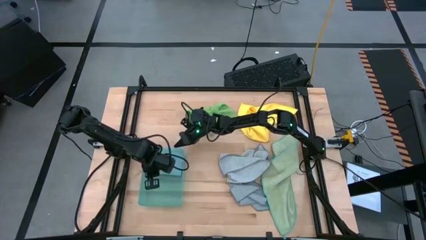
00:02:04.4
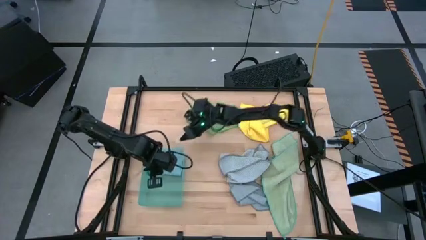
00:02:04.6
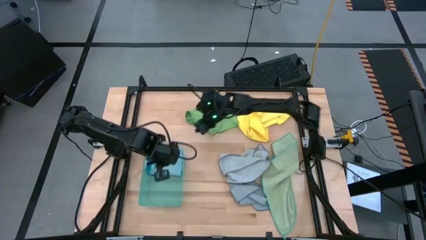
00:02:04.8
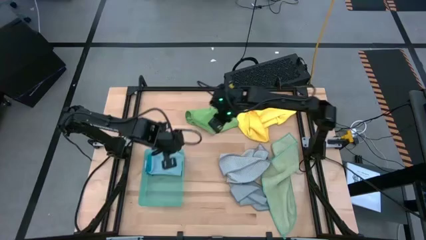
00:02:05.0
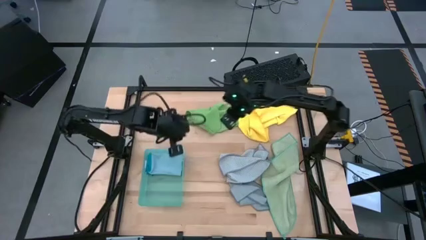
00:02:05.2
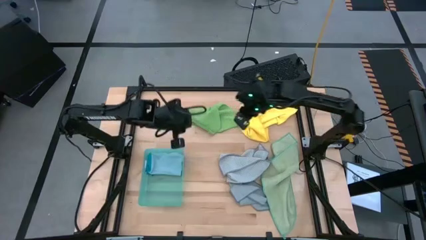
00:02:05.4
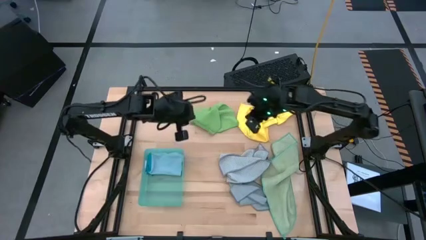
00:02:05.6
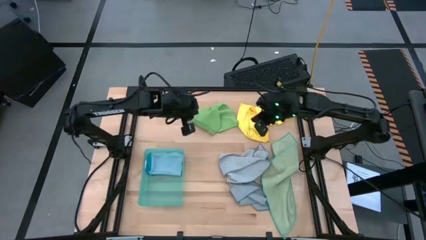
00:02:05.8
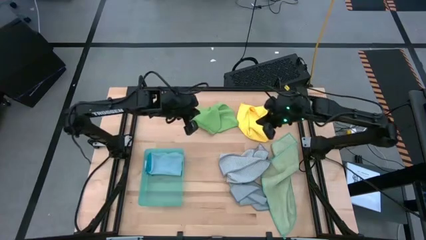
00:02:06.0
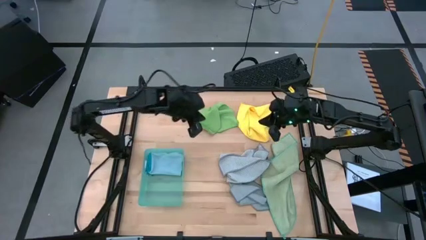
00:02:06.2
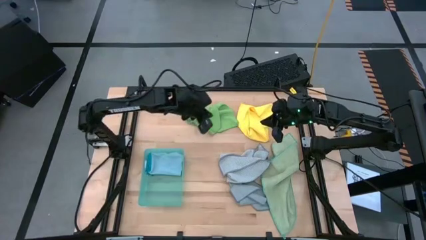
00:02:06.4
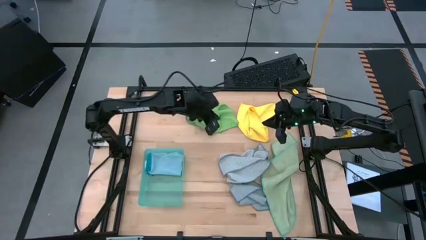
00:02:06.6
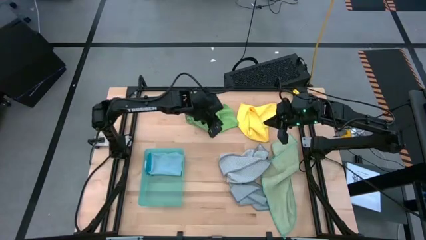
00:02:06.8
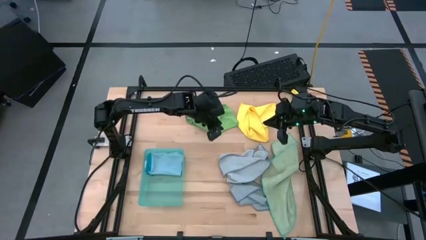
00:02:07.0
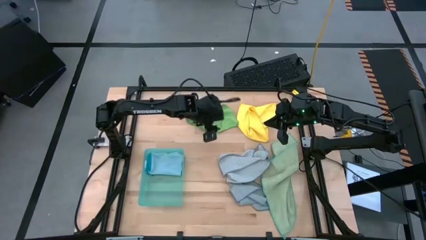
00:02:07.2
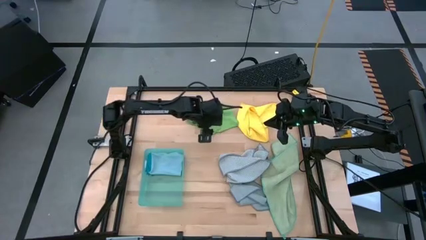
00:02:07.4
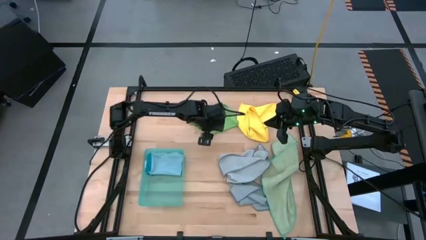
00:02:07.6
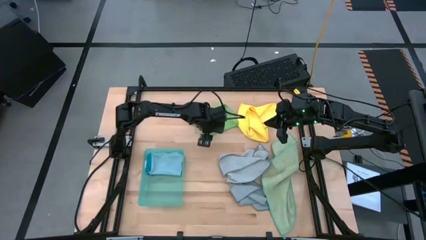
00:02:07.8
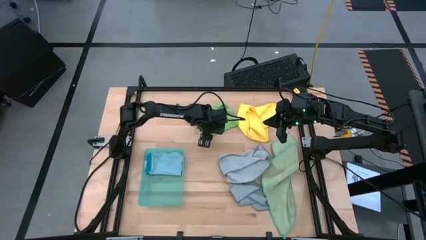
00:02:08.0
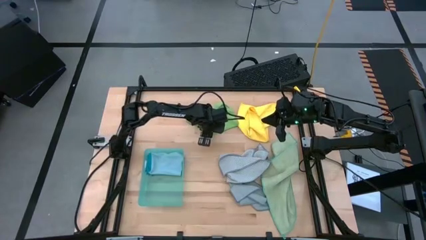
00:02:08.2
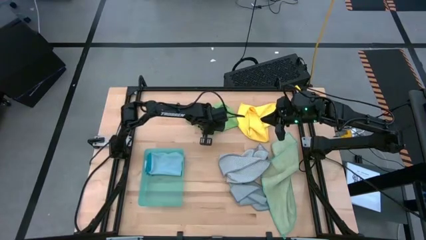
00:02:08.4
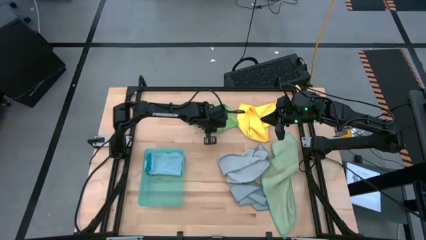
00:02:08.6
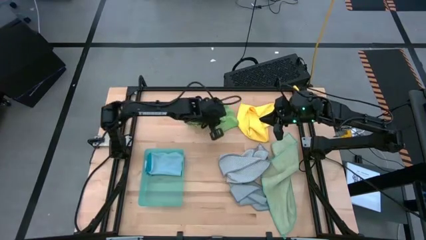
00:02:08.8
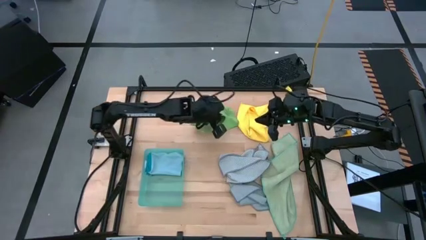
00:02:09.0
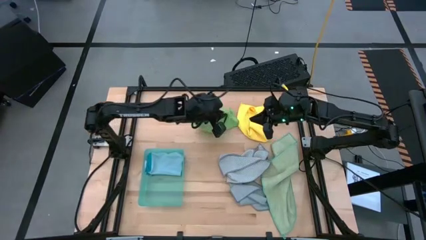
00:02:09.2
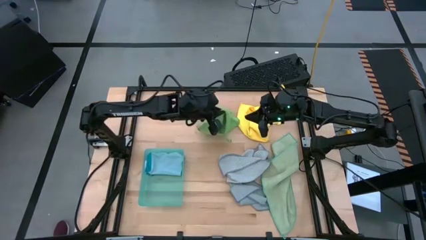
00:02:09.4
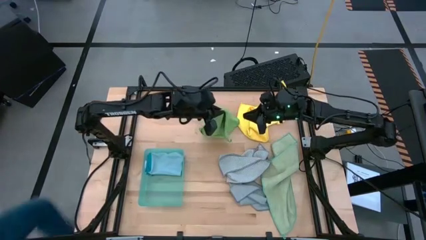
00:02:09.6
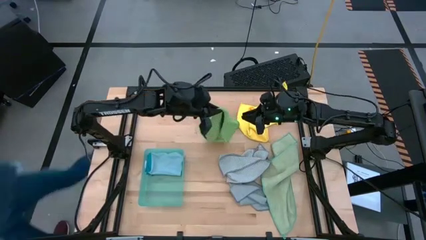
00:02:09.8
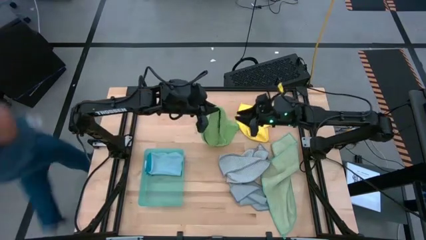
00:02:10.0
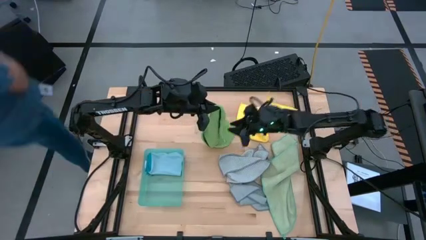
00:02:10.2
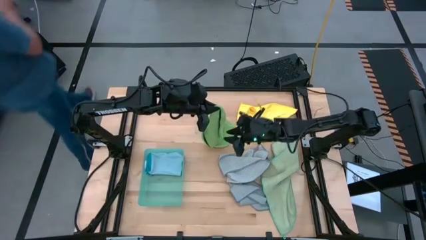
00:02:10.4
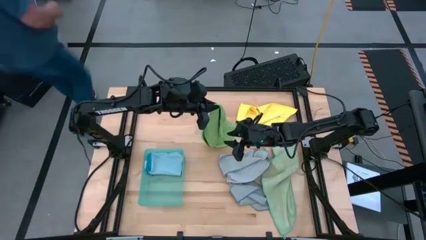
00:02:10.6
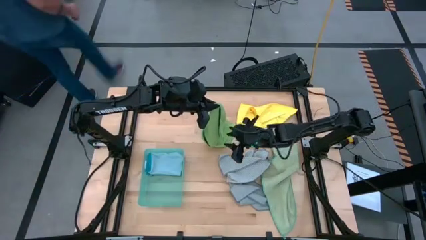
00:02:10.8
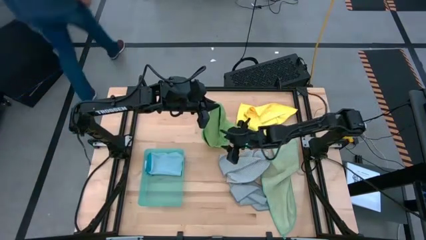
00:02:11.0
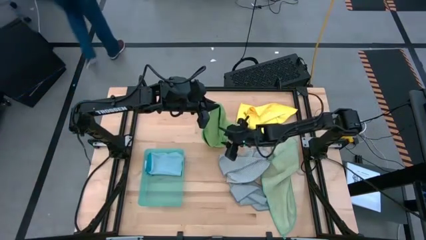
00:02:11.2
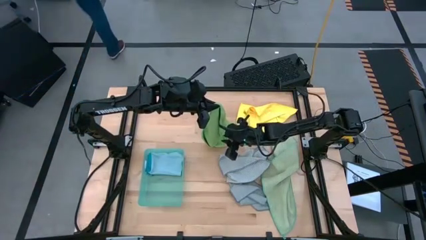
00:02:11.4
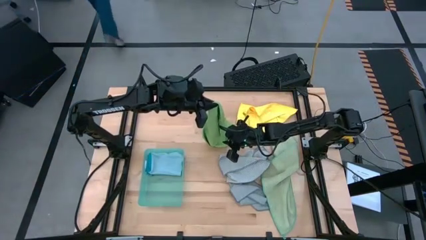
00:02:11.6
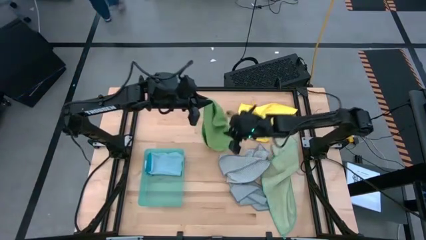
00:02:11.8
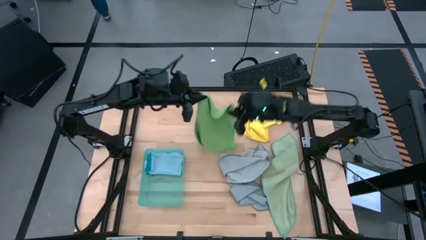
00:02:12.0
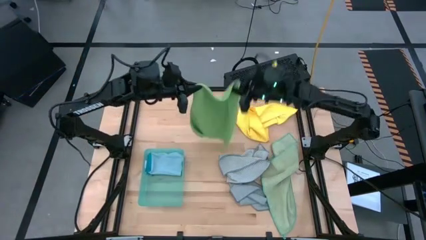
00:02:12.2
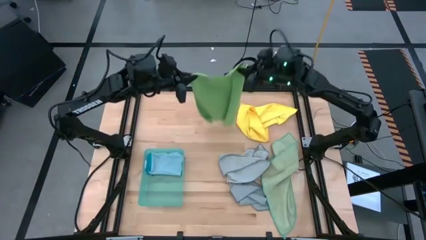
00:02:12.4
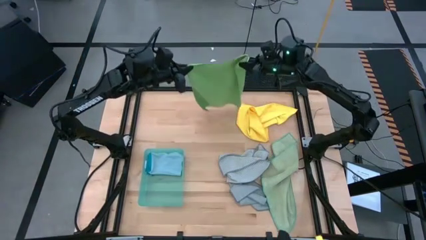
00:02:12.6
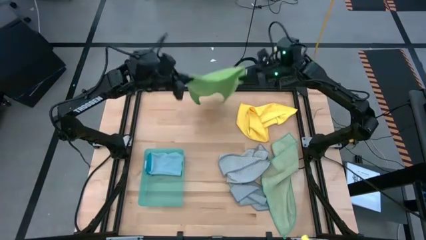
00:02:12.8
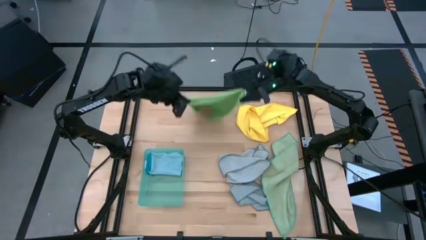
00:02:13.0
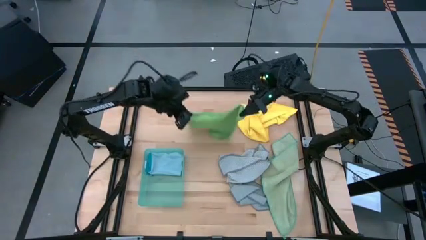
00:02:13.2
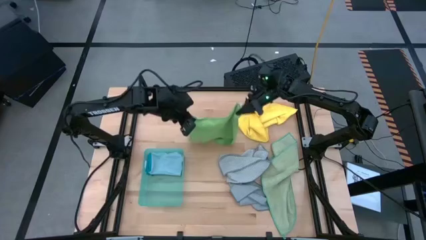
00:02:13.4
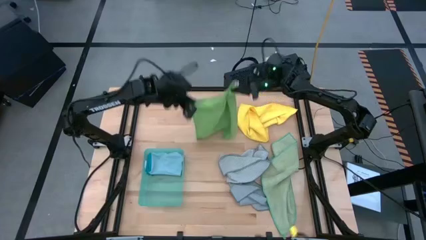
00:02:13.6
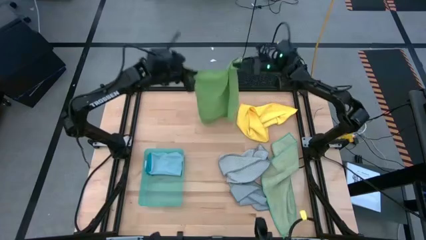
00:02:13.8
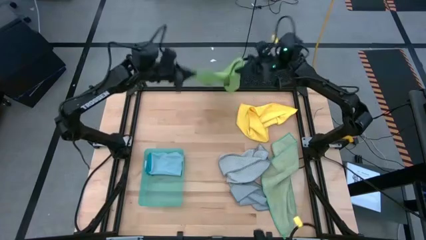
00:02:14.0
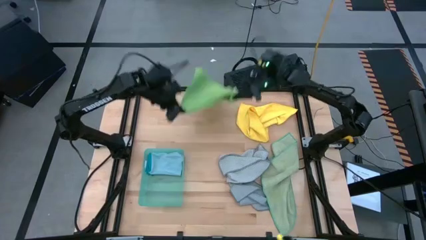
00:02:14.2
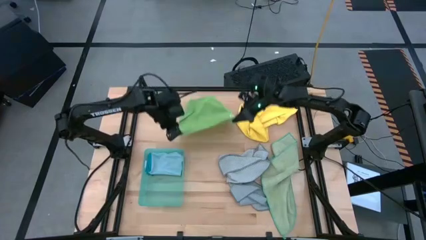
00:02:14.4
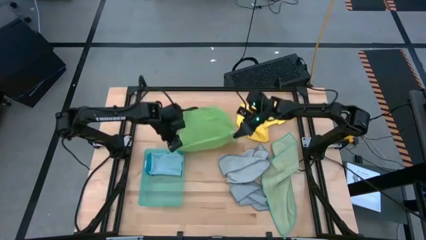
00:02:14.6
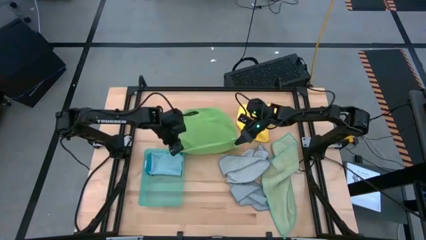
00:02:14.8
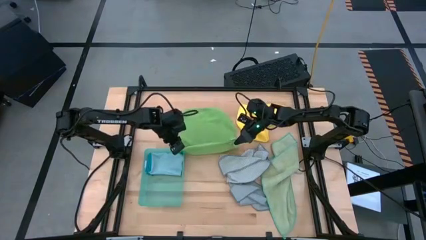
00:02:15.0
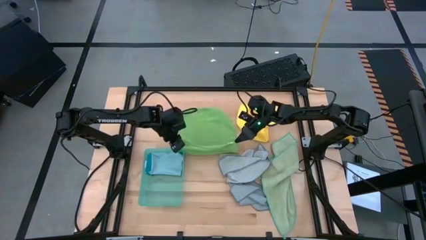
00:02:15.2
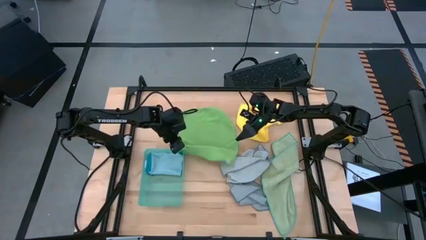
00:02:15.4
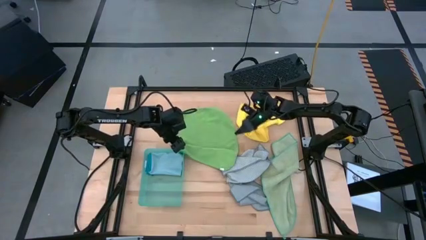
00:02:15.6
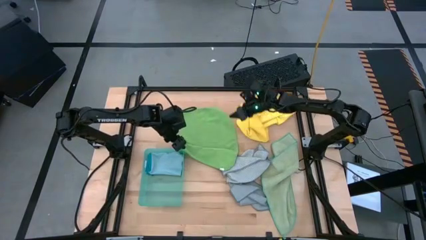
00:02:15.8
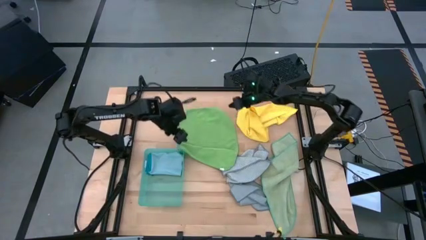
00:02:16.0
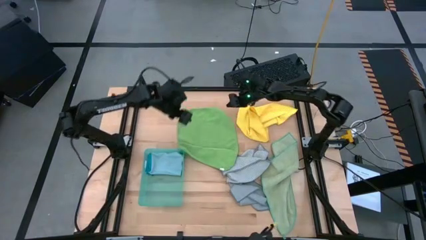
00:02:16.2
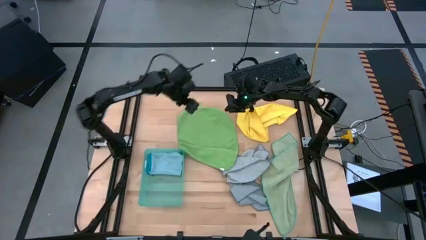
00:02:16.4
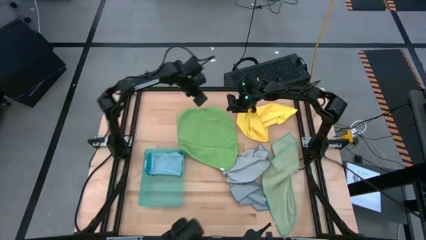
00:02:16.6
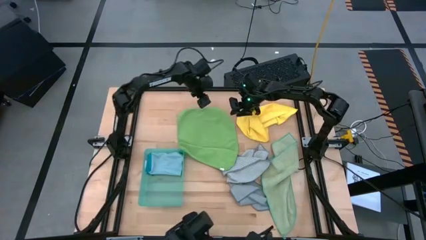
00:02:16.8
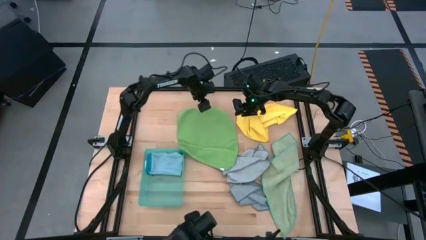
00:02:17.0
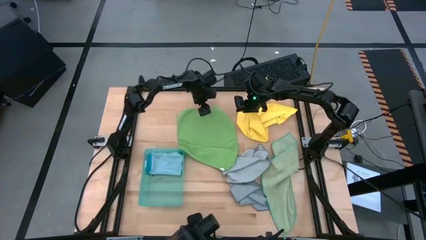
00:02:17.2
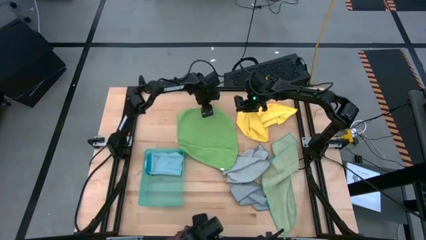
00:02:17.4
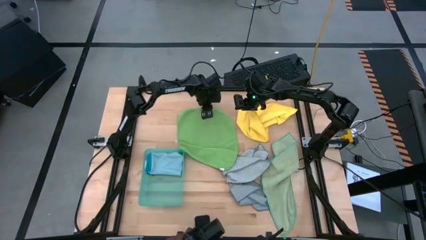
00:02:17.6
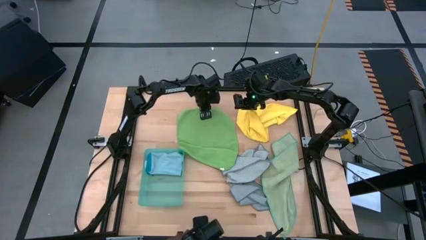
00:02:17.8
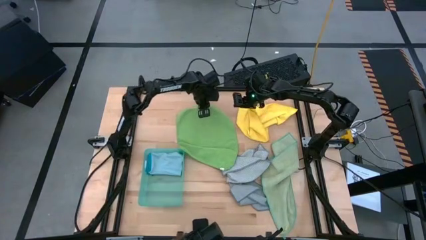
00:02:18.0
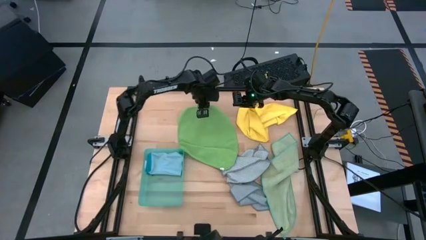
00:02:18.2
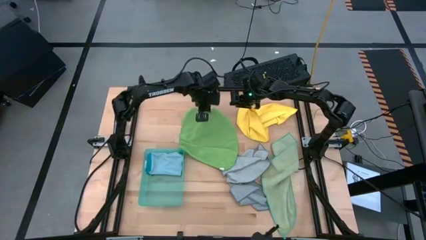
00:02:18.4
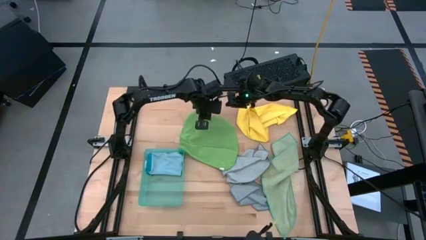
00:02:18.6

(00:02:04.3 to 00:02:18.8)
Task: Fold microfiber towels
Fold the green microfiber cloth

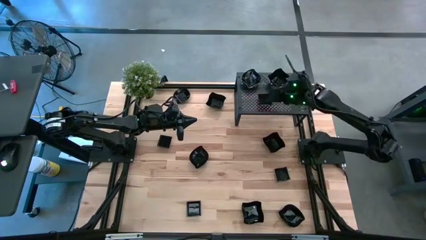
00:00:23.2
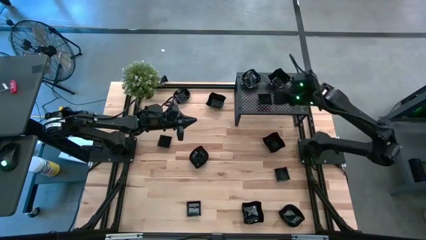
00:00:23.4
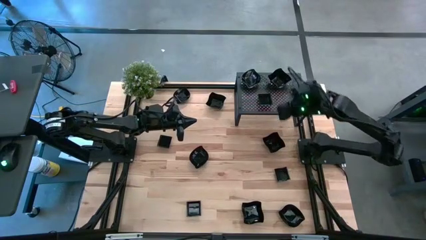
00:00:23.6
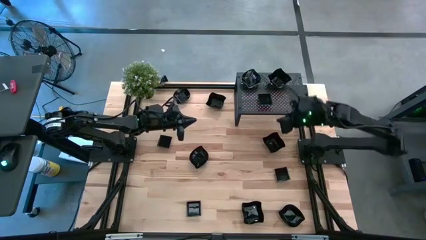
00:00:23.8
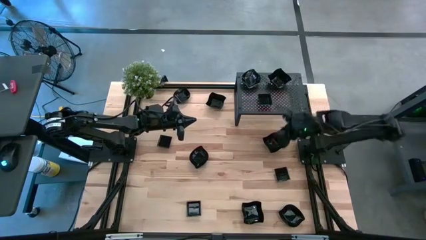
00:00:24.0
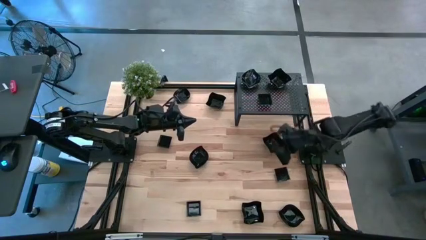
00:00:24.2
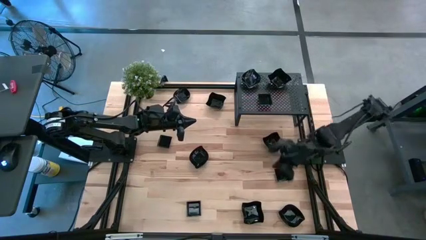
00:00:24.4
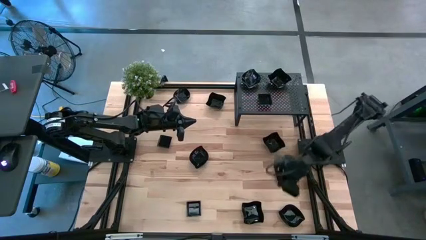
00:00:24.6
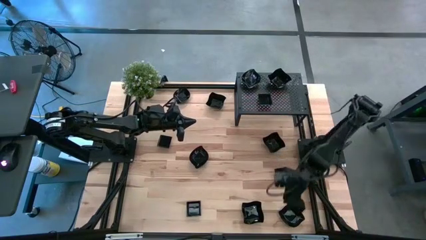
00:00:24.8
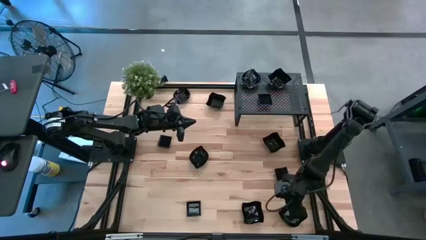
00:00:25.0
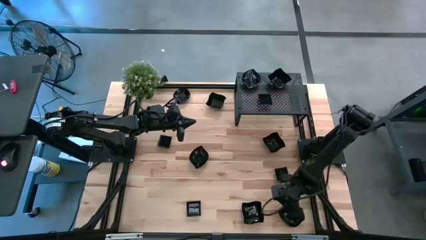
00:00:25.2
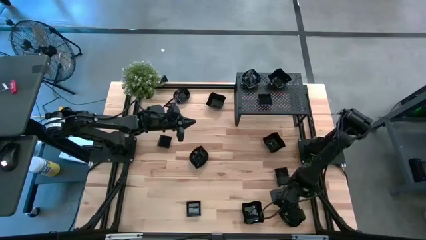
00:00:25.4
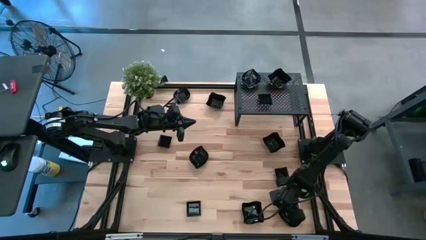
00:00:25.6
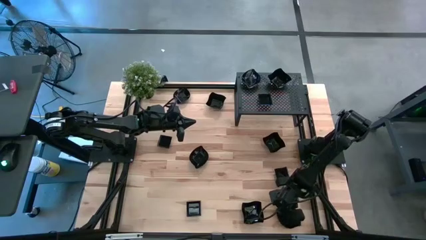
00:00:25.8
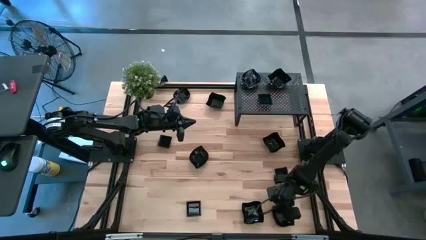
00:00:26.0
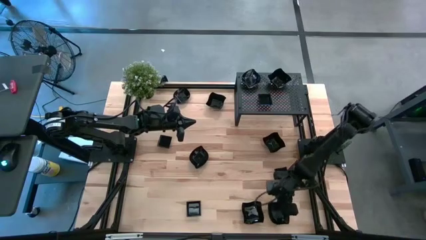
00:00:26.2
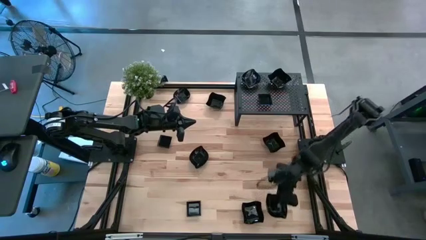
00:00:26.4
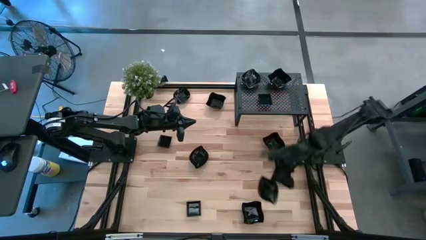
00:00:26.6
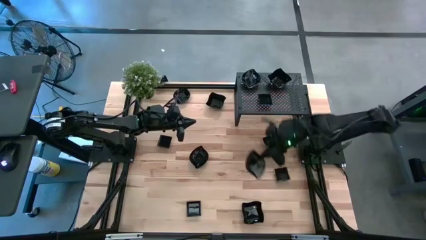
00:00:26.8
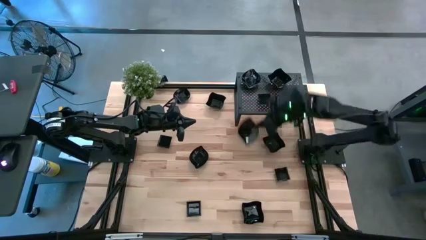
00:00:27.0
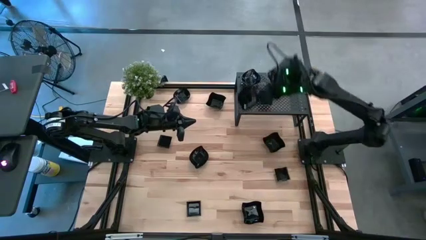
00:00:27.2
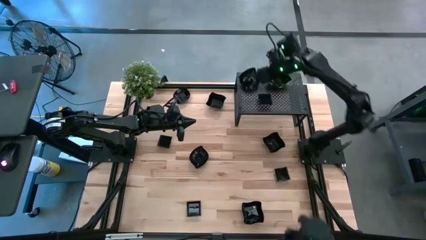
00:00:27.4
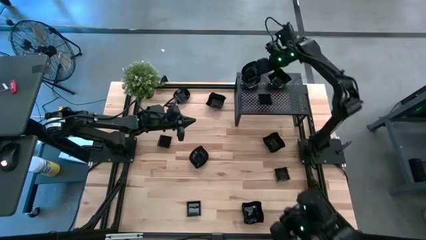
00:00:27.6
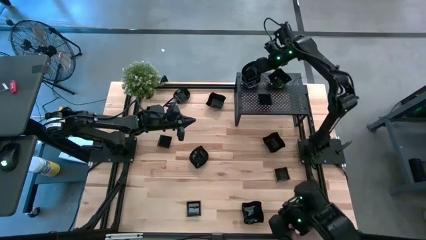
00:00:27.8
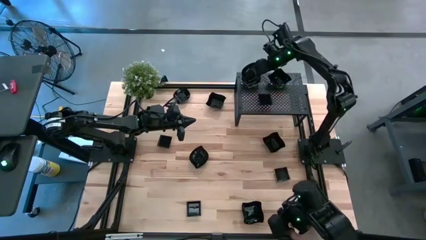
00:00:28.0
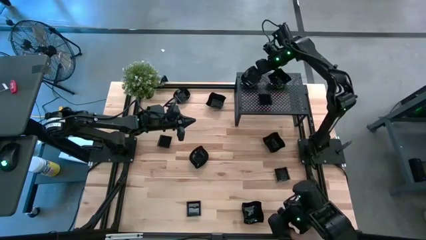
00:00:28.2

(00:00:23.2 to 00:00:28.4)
Task: Pick & Place Mini shaped plates
Stack the black leaf-shaped plate on top of the black leaf-shaped plate on the shelf
